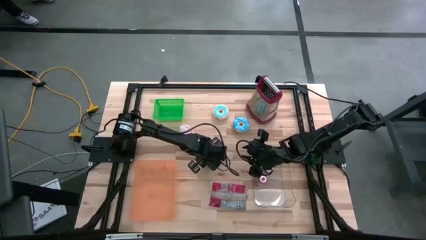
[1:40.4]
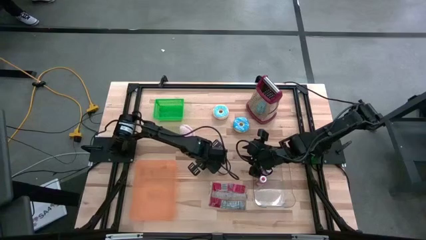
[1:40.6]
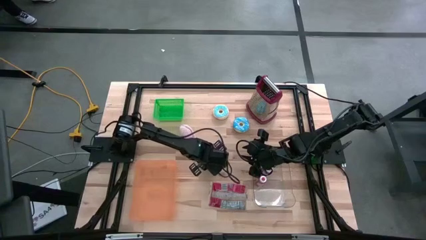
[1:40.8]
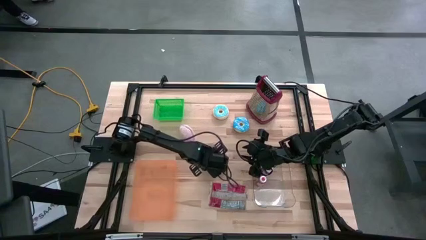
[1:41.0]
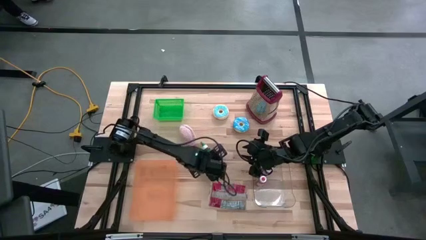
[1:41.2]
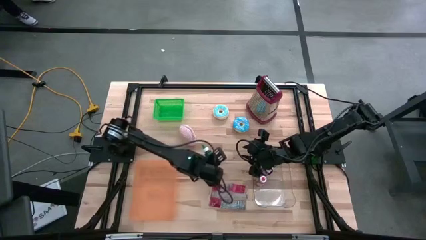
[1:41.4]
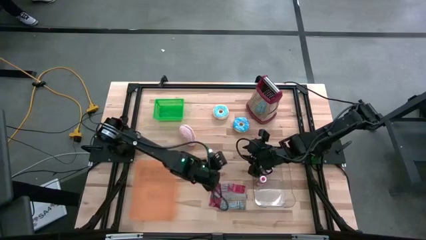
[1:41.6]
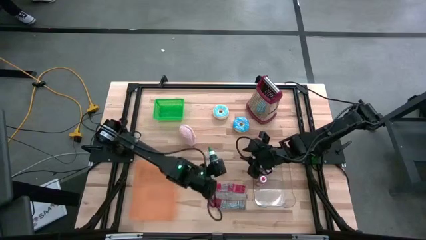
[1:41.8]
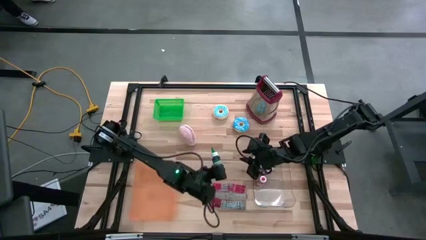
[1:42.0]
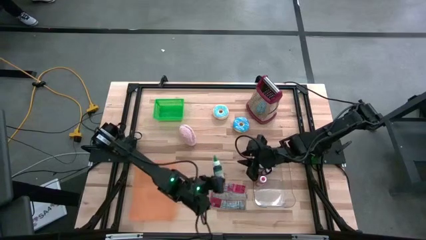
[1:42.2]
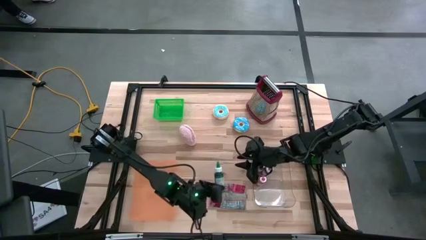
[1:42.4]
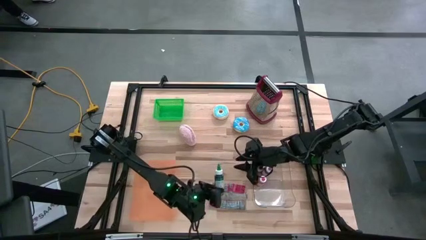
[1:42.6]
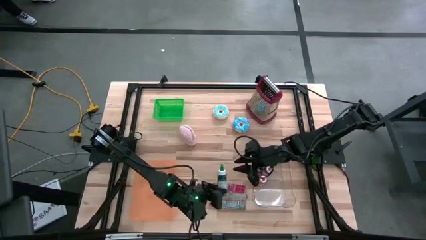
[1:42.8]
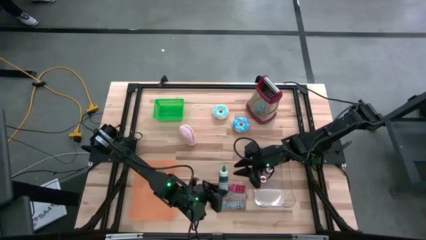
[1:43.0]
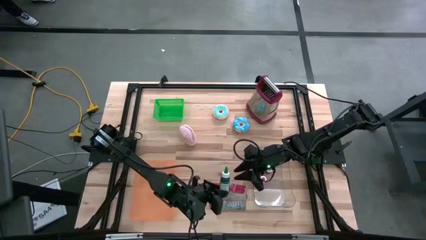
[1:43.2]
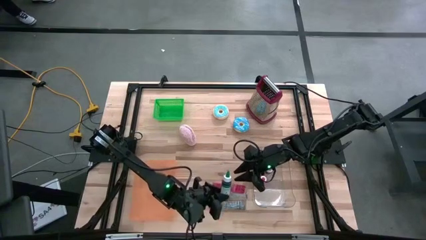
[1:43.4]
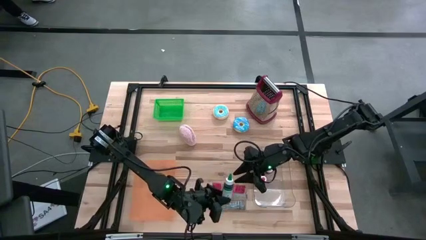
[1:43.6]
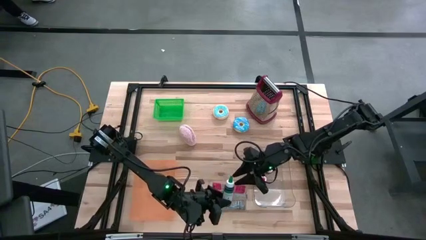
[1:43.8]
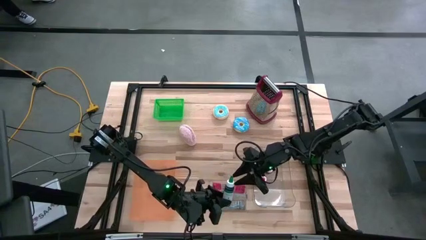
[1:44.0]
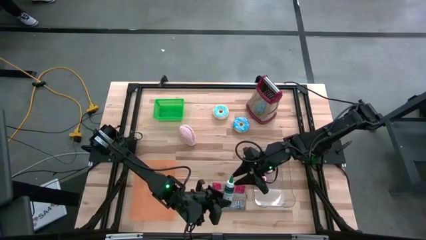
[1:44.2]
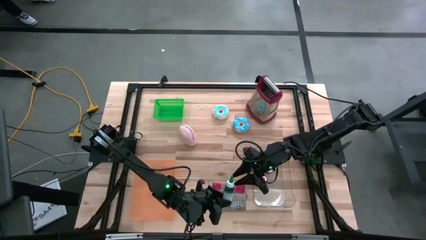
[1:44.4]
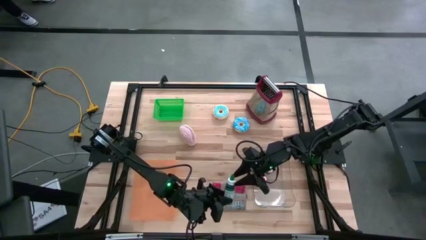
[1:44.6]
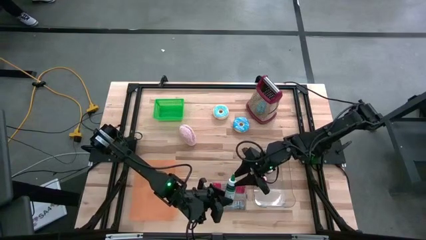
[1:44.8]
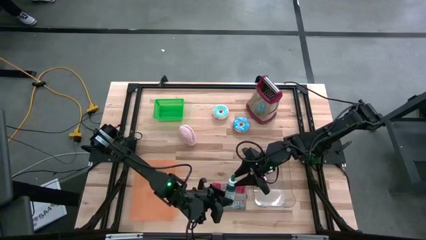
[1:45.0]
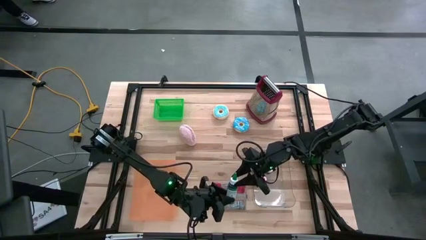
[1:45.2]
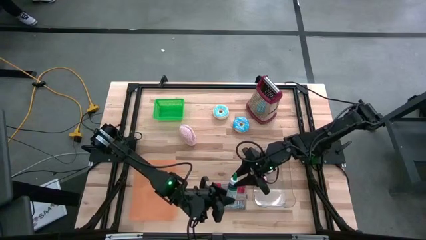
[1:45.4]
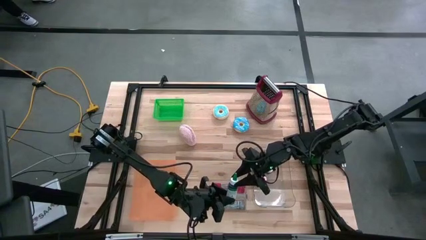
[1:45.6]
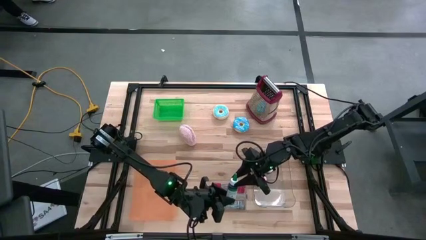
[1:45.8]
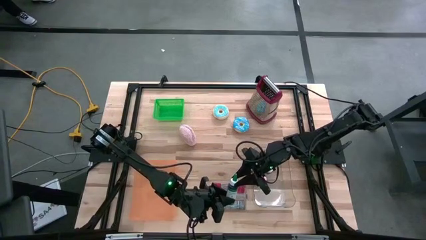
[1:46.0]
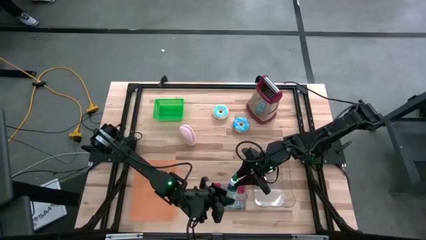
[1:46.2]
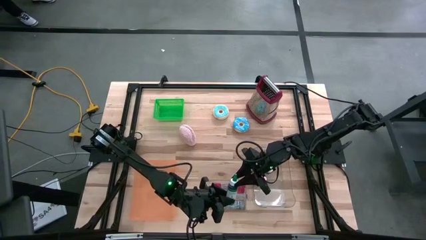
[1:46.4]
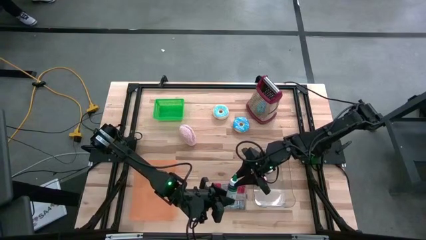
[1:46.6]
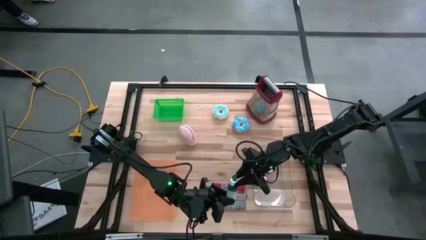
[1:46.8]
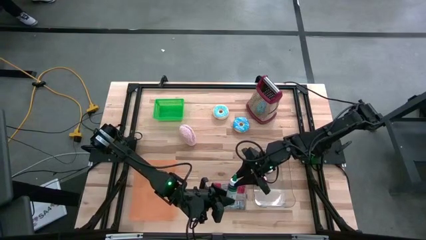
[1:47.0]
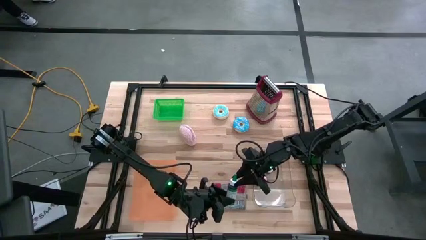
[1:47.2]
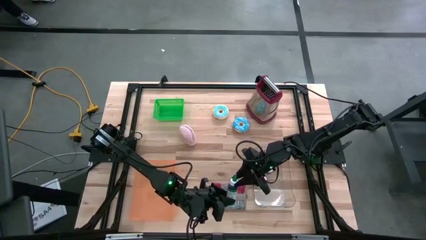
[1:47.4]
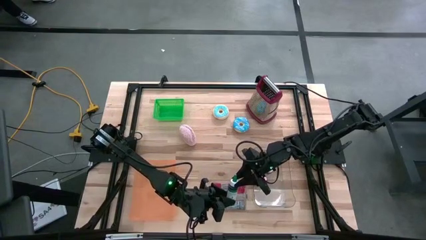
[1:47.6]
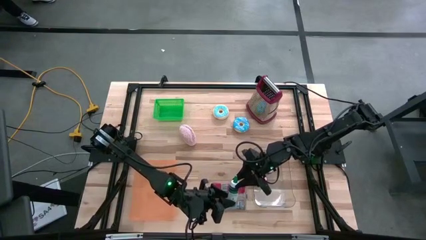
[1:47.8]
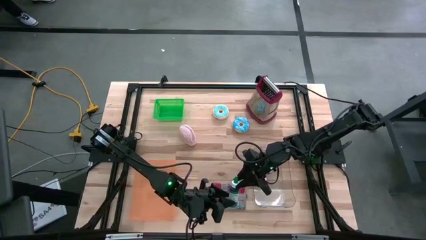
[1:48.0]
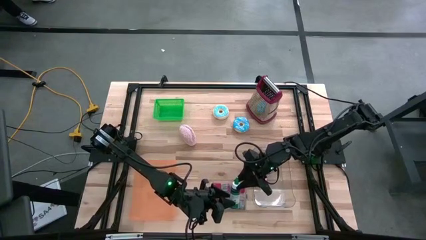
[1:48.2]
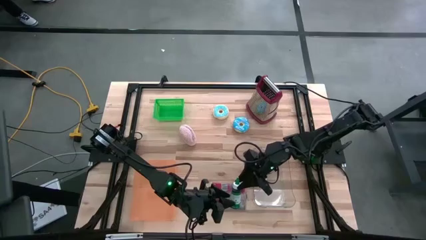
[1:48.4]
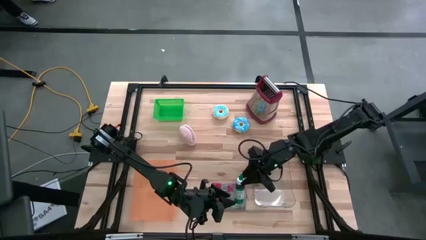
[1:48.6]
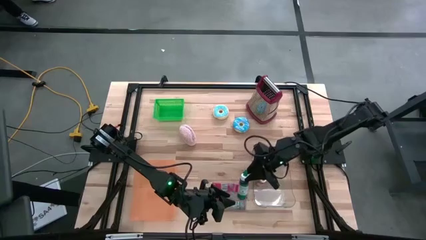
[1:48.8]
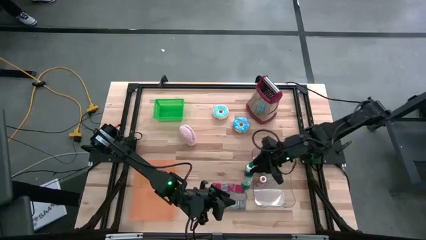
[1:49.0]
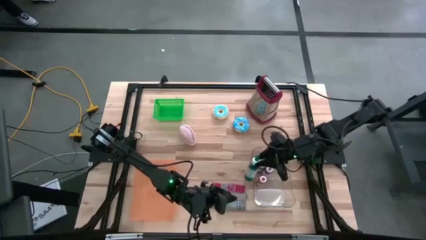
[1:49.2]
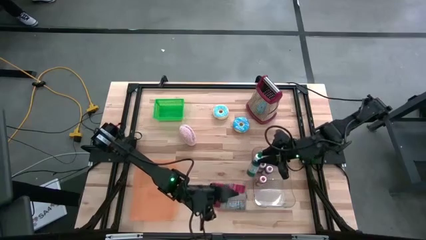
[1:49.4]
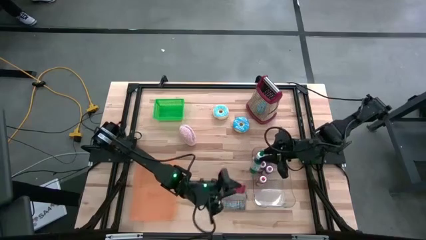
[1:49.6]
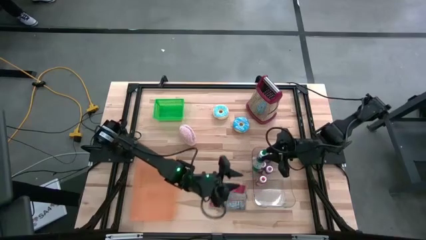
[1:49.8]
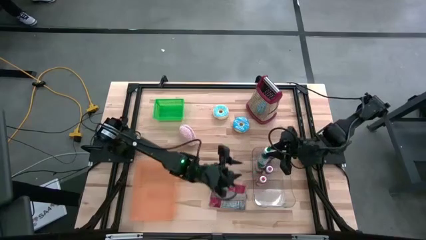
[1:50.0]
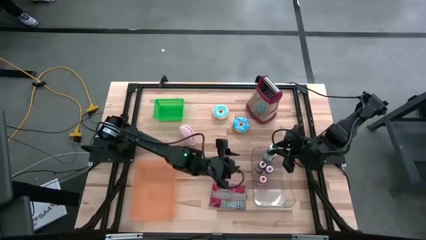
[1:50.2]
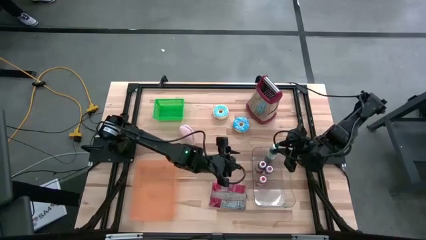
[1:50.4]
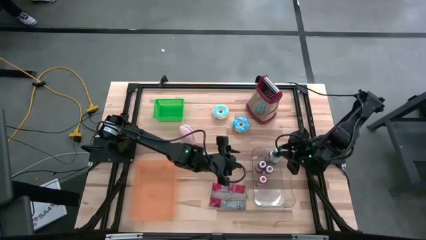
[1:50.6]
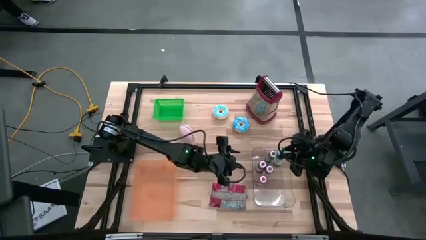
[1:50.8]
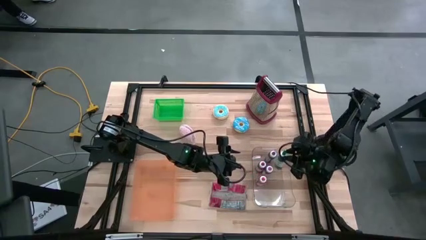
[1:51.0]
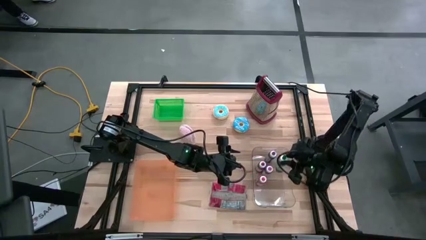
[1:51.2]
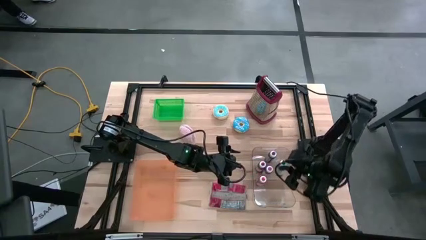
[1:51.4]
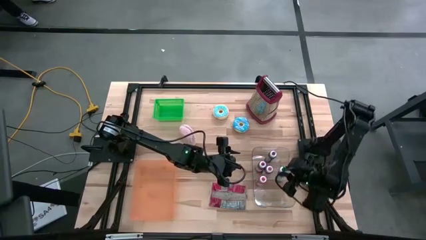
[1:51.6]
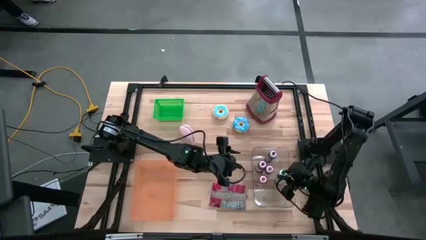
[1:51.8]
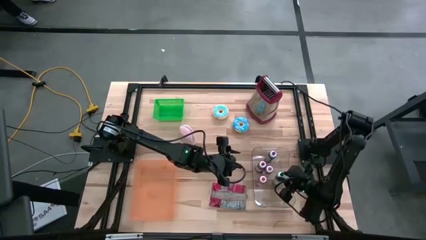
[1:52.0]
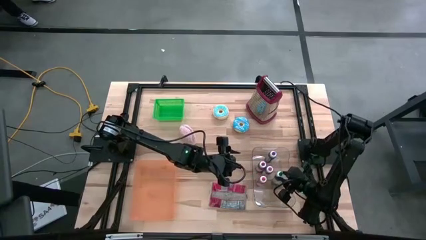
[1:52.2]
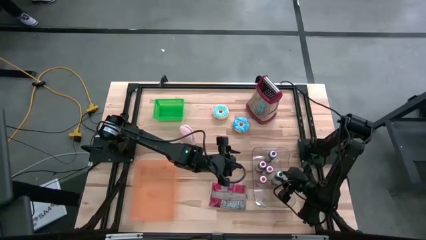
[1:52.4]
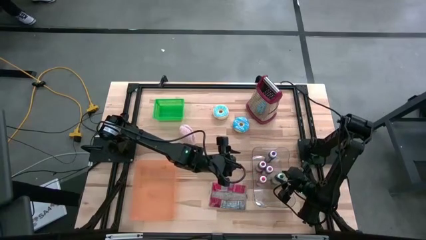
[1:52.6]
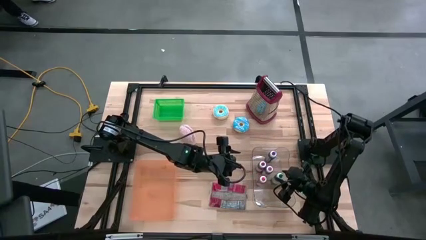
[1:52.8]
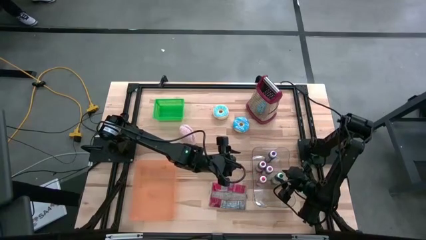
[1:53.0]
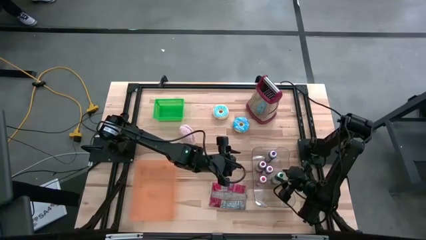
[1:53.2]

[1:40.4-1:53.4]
Put the green paint bottle into the transparent bin

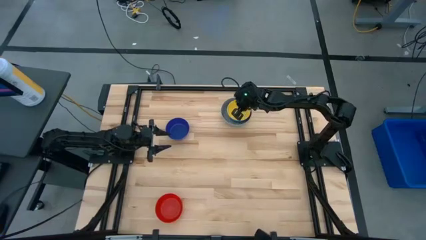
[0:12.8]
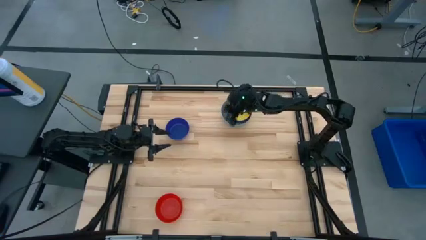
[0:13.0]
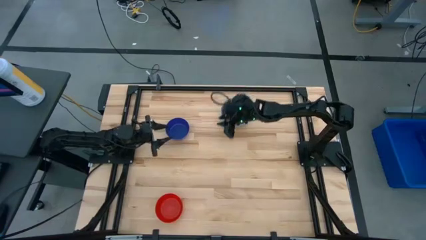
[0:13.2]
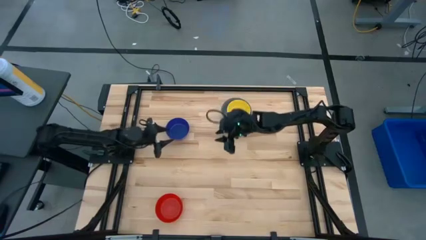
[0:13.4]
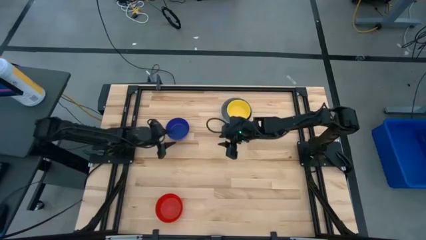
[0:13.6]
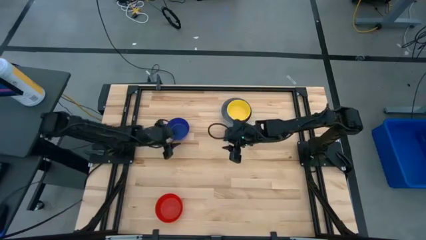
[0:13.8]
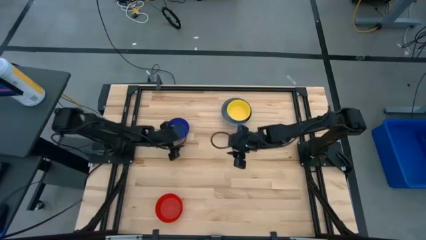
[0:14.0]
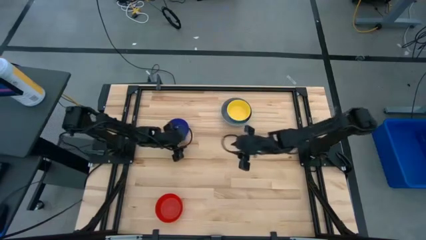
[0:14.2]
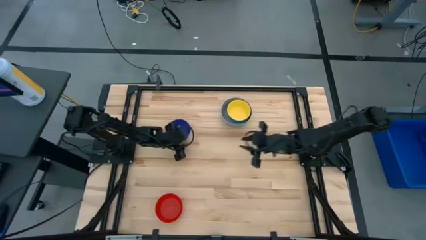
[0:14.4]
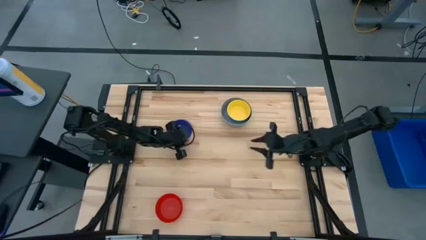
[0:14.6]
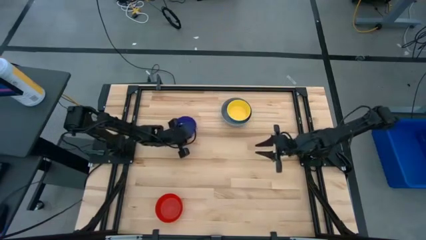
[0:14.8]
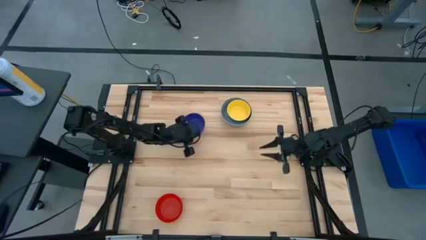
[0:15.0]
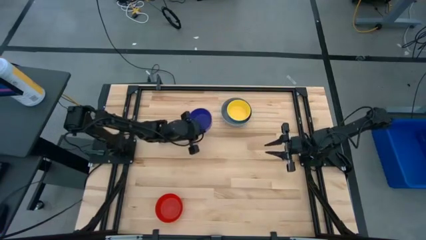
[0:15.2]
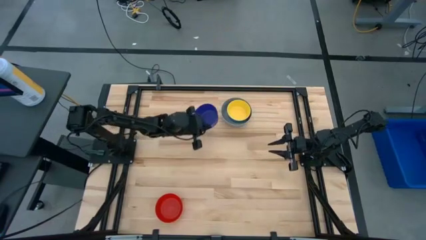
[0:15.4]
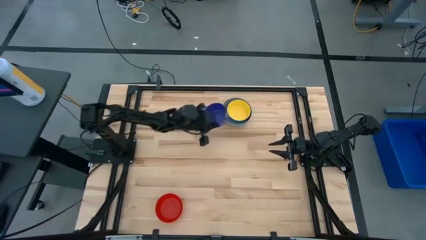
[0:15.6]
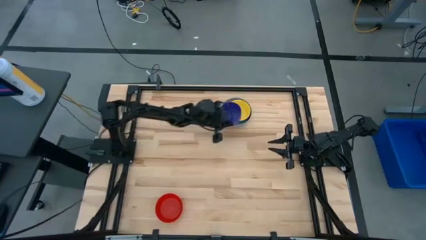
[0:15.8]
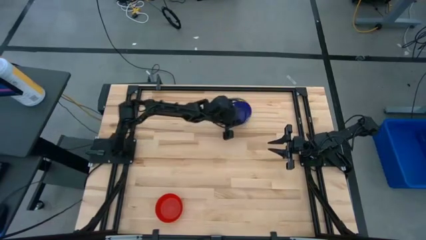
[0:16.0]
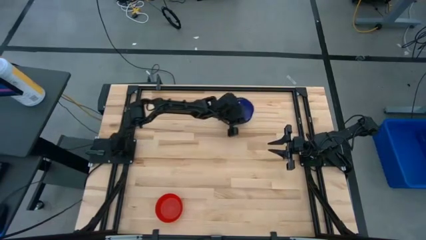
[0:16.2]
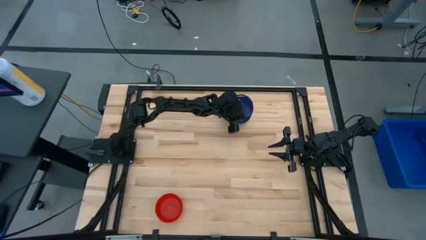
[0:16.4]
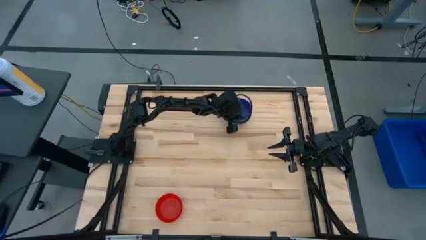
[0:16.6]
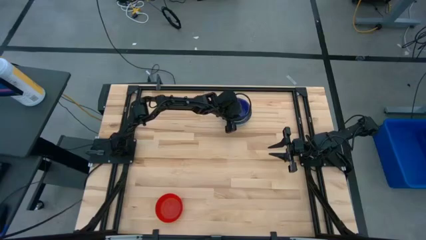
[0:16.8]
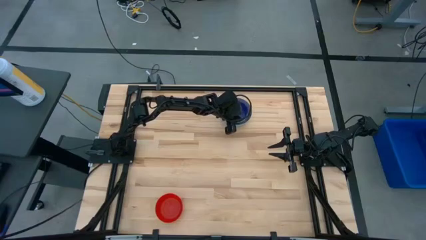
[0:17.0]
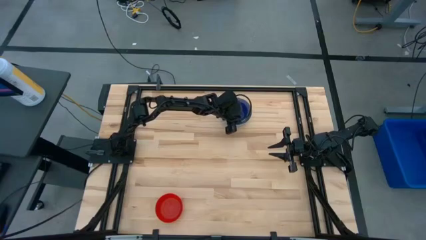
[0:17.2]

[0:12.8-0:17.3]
Stack the dark blue bowl on top of the yellow bowl
